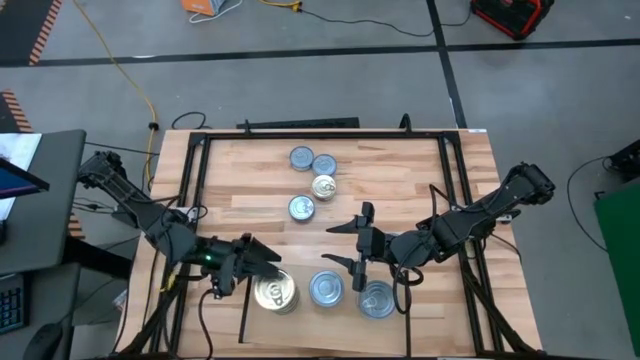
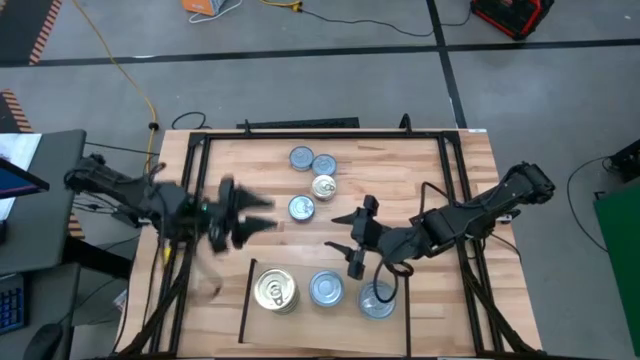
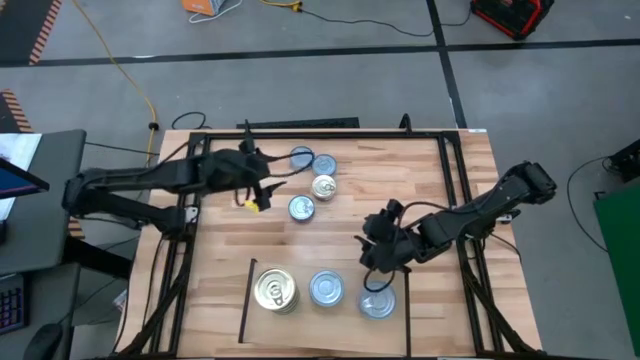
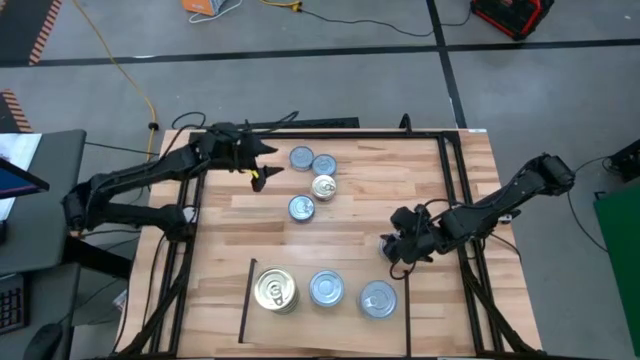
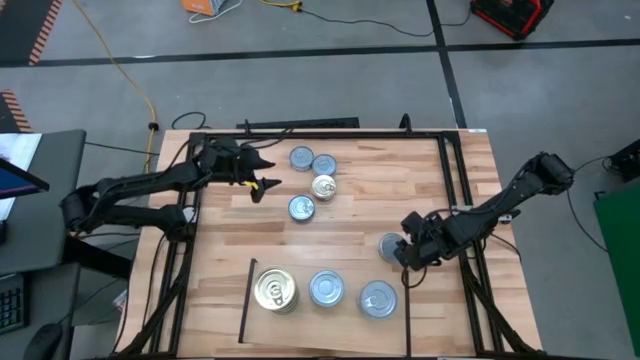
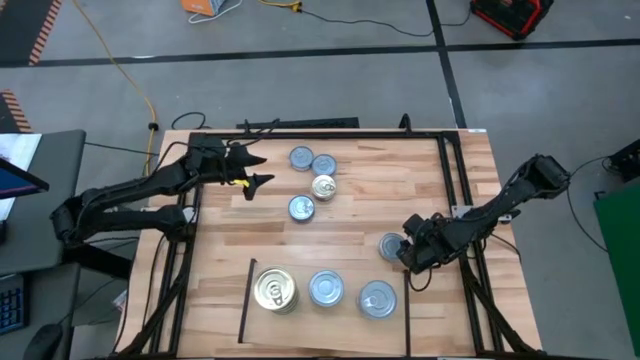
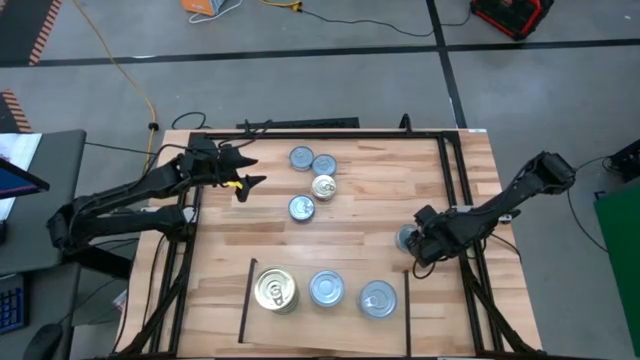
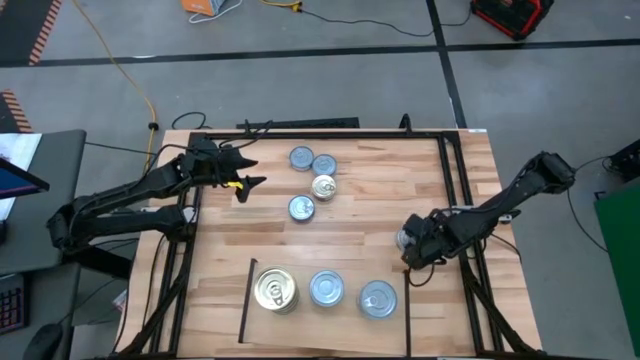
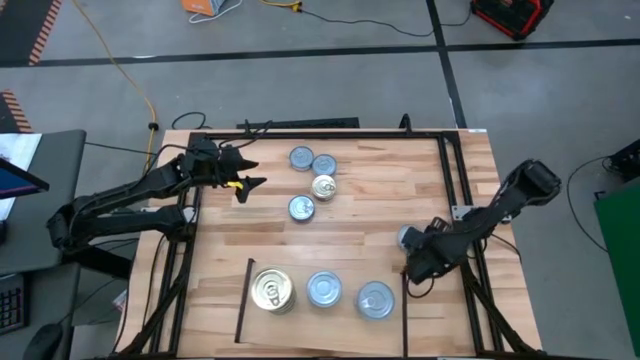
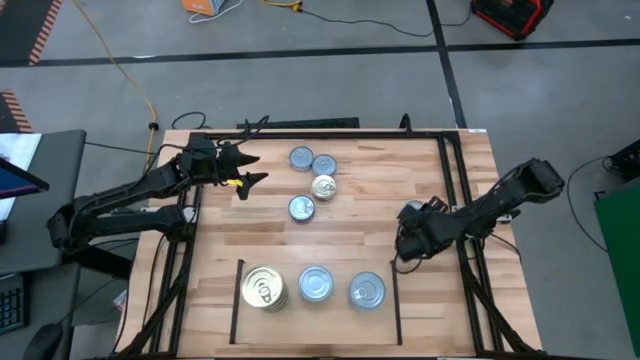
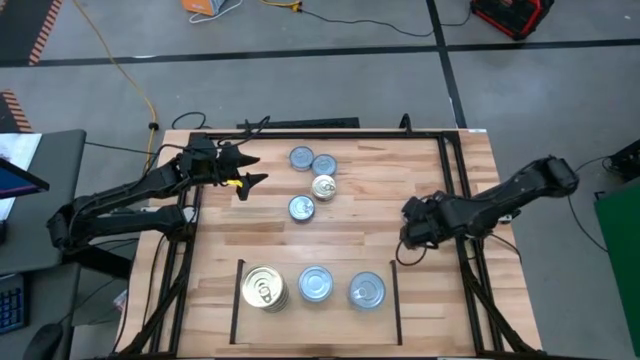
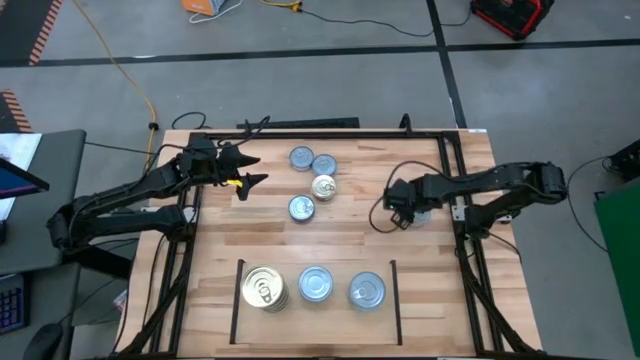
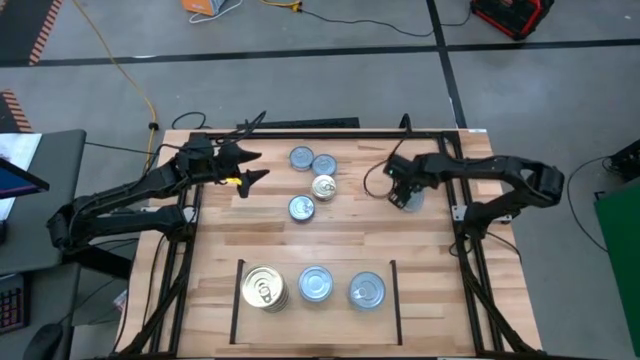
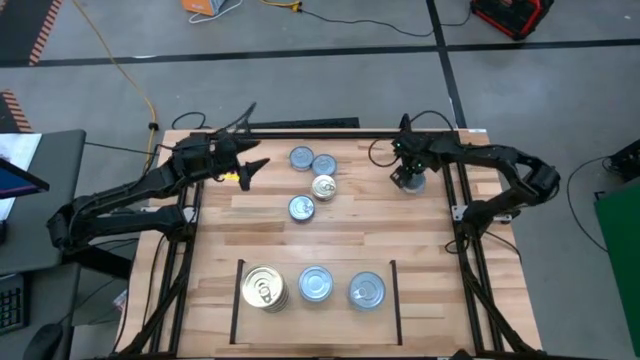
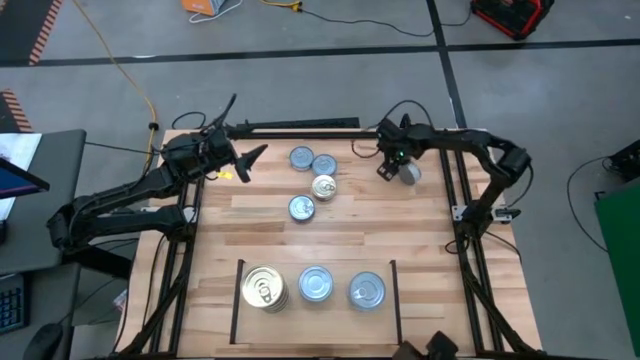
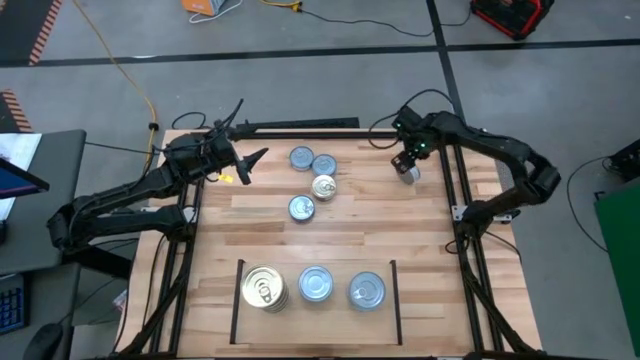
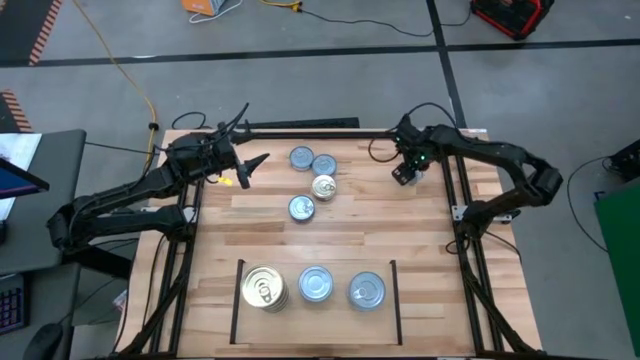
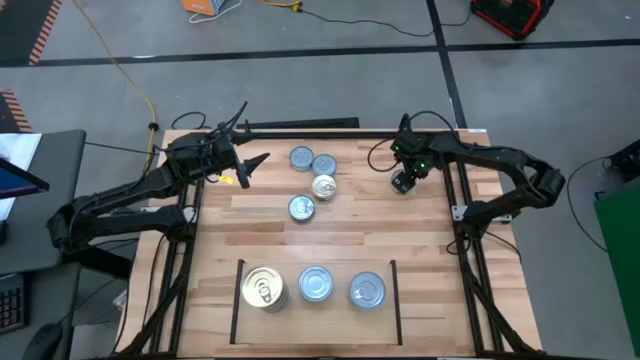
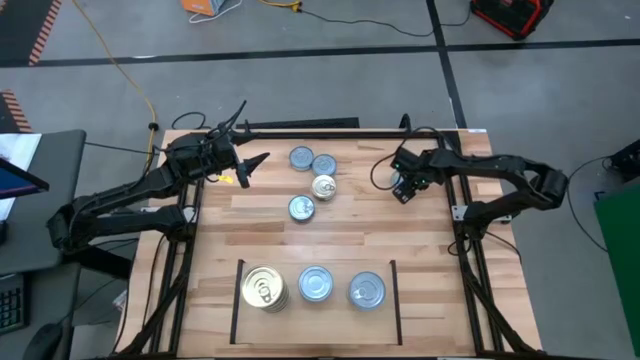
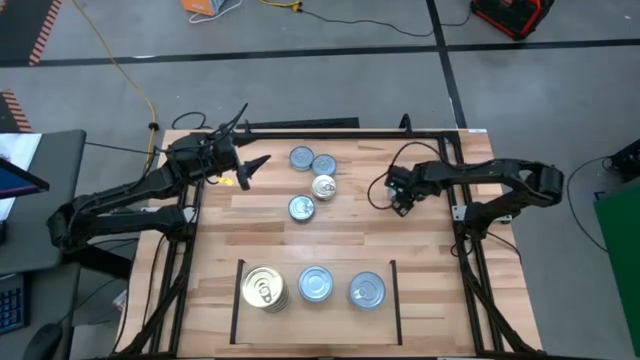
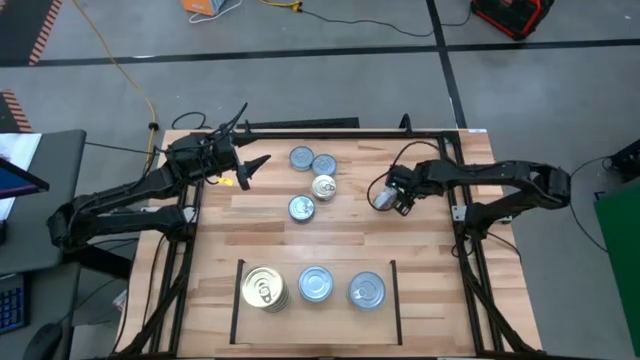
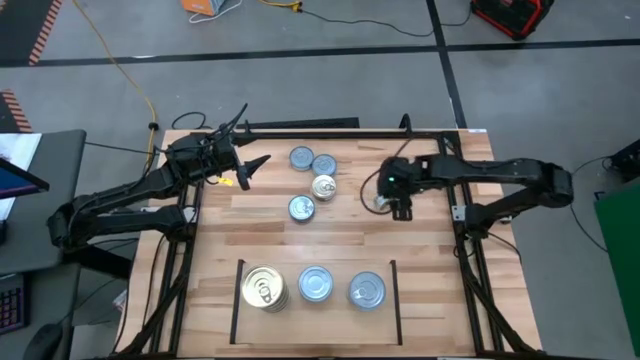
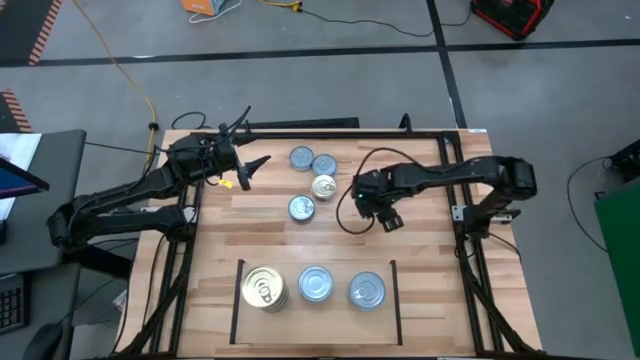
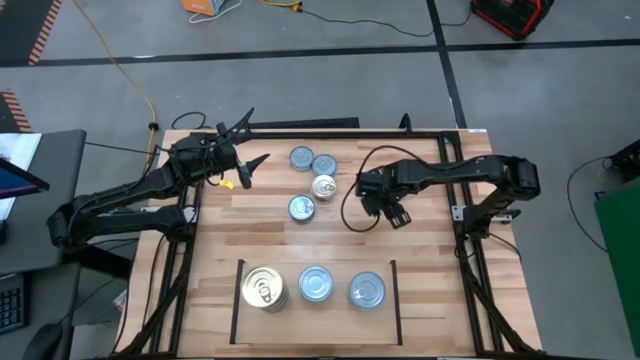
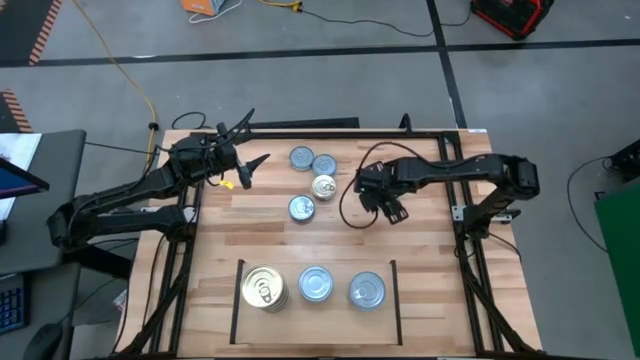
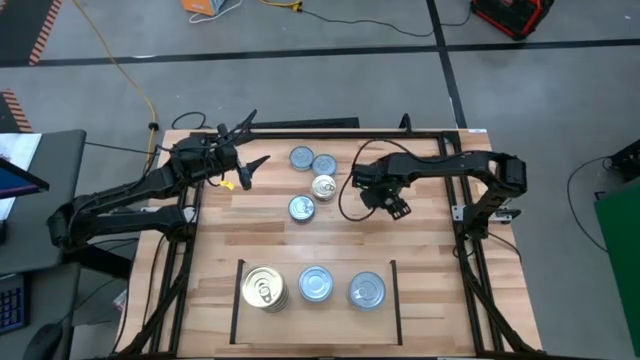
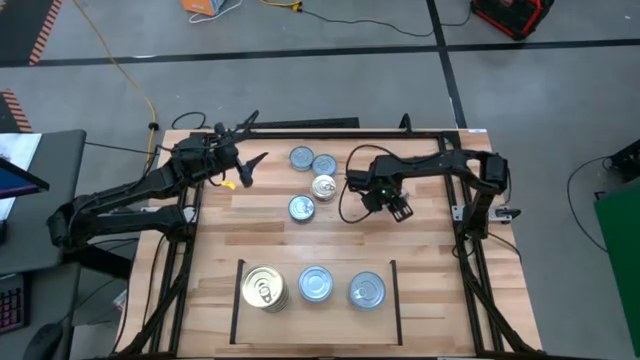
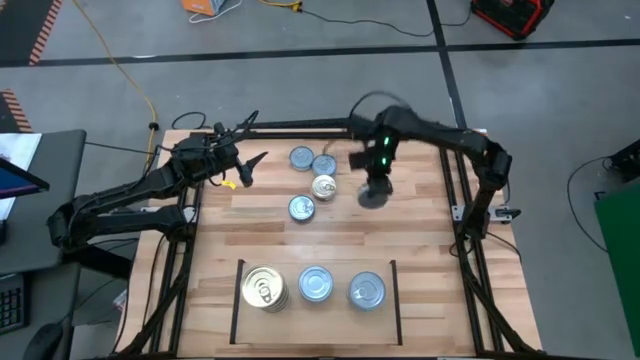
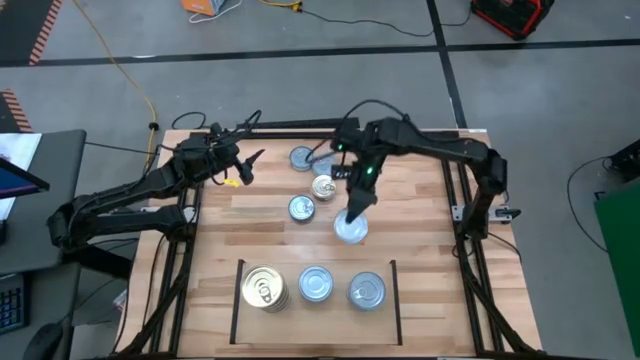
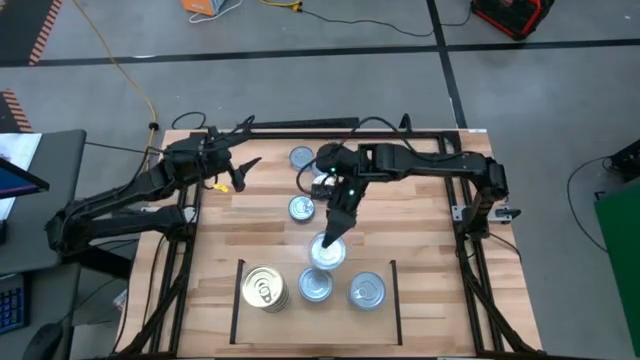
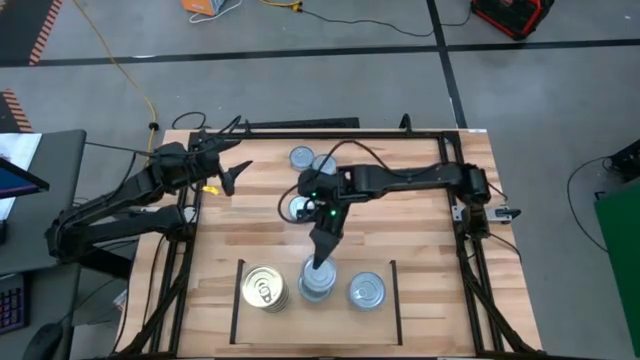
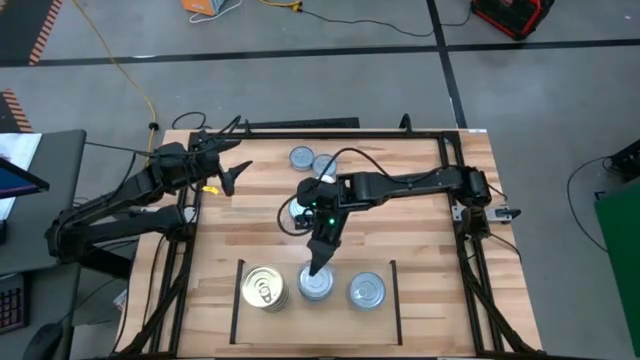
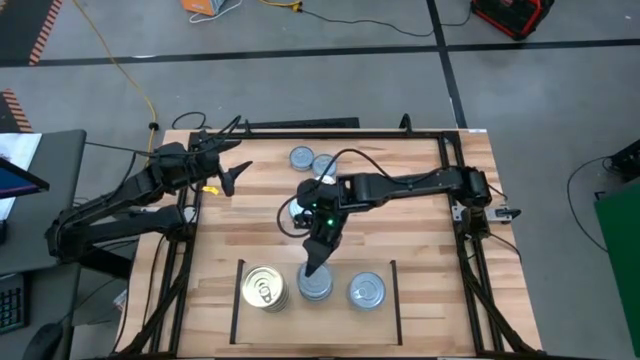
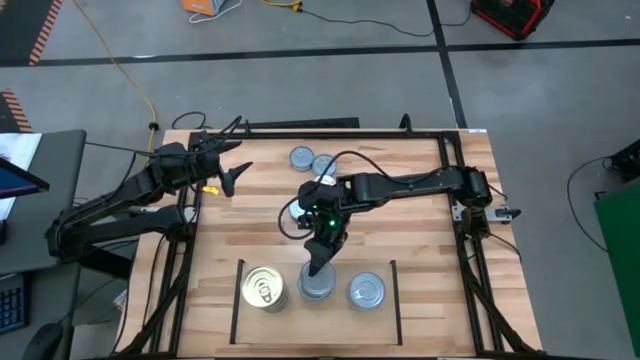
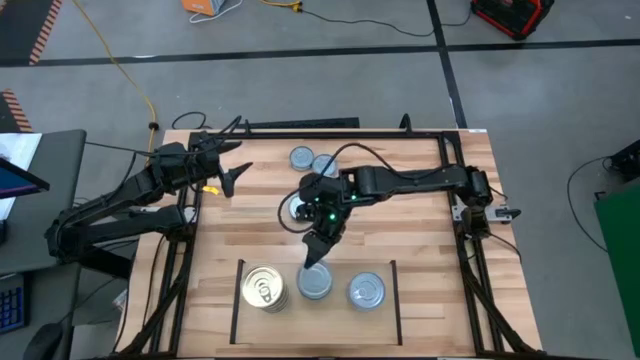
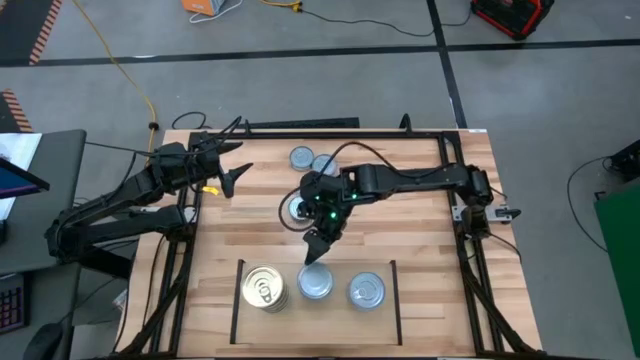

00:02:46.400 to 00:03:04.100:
Task: Stack canned seafood by type on shelf
Put the green and white tuna can on the top of the middle stacked tuna cans on the shelf

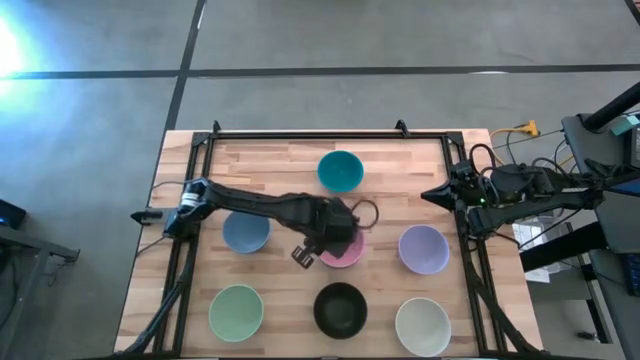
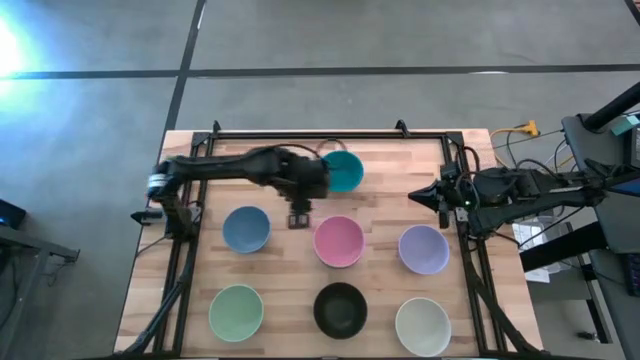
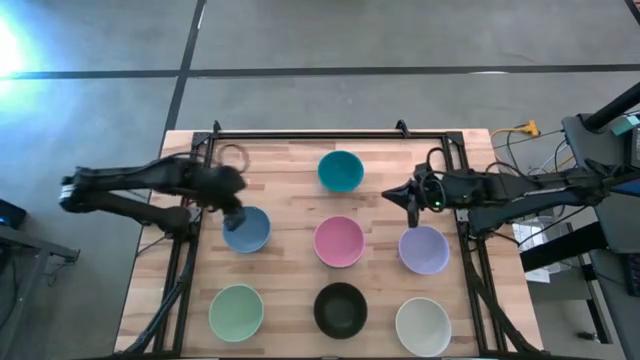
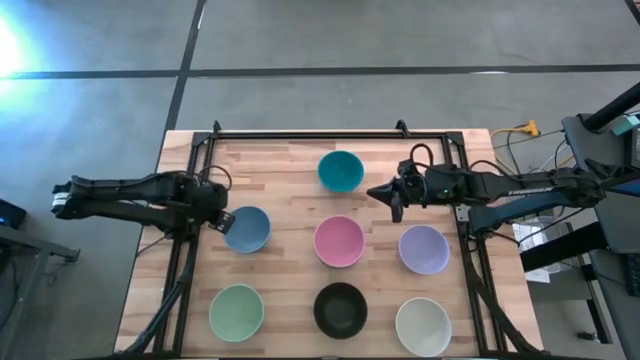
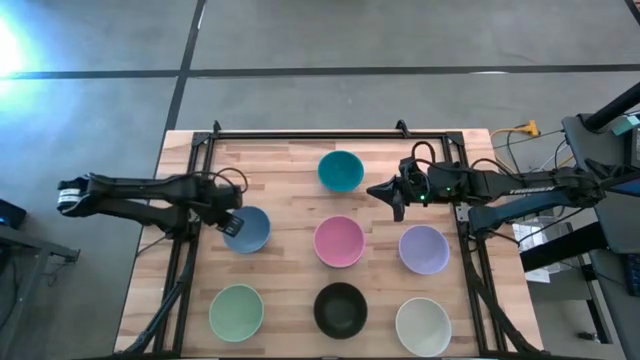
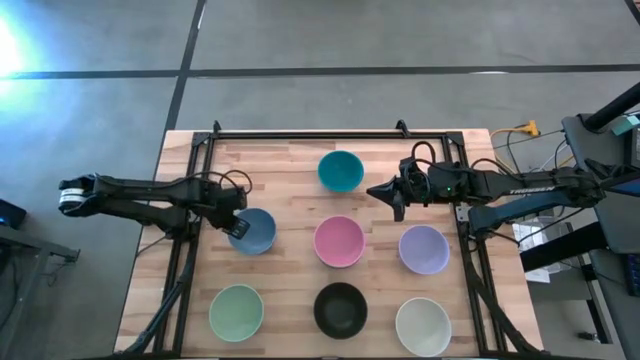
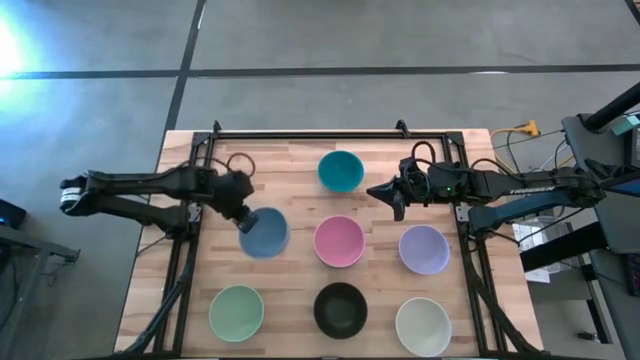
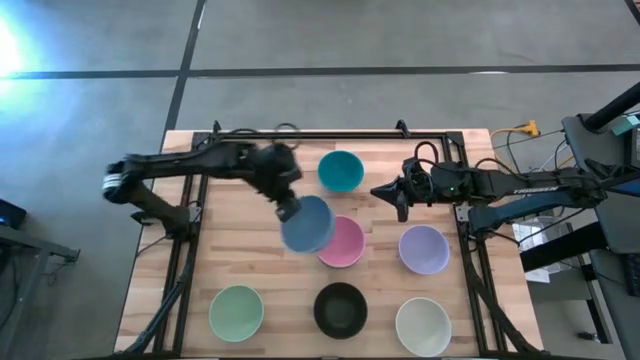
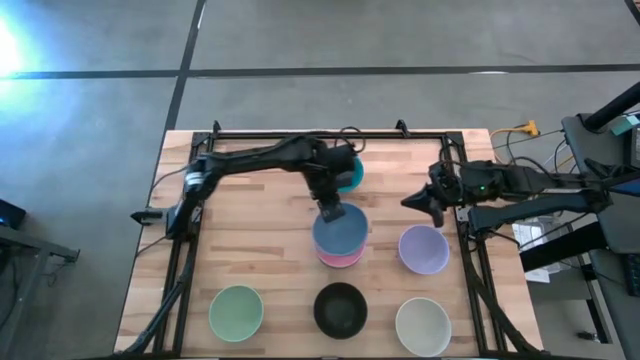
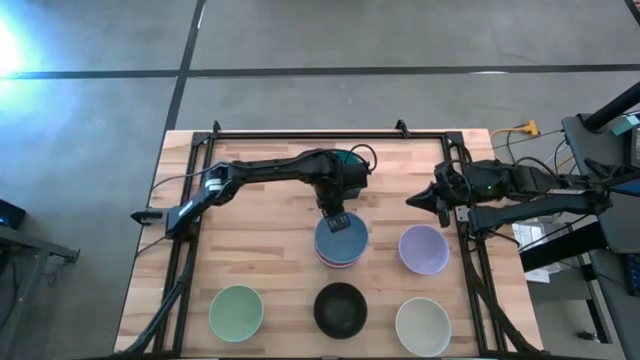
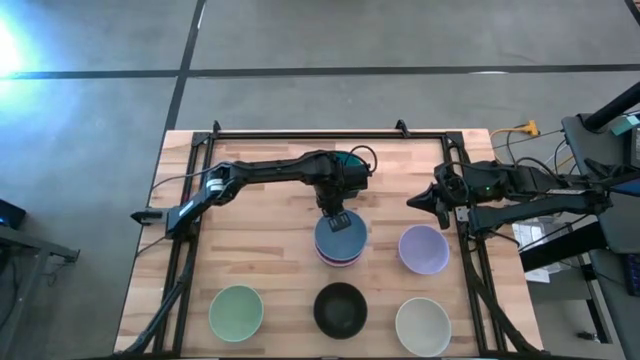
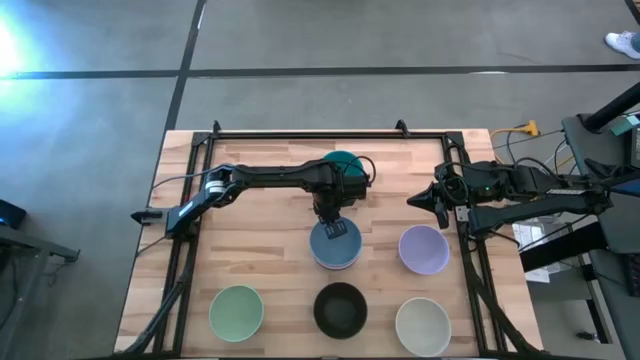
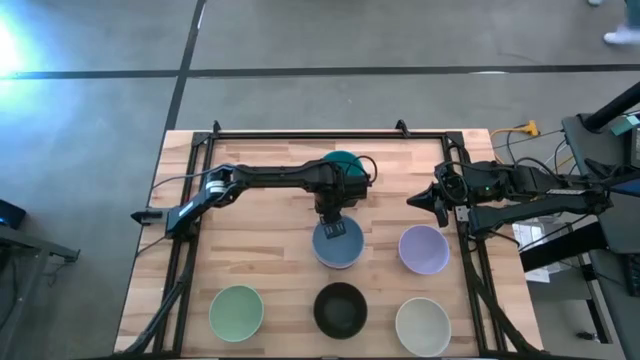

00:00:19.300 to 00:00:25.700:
Task: Nest bowls inside each other
Stack the blue bowl on the pink bowl
